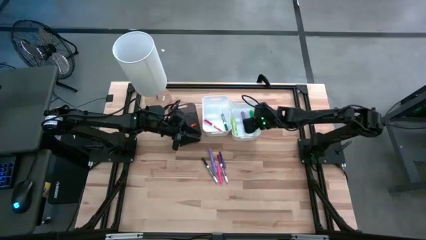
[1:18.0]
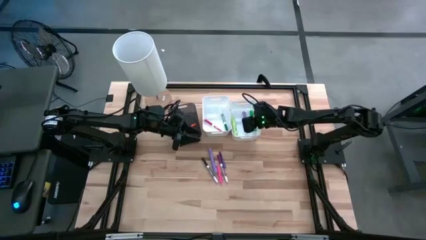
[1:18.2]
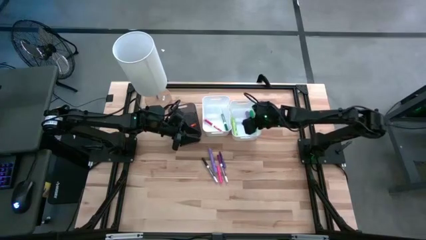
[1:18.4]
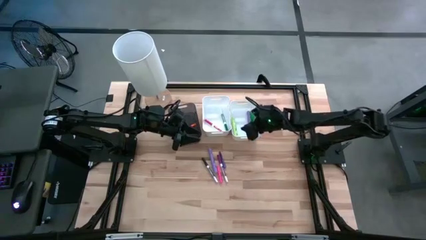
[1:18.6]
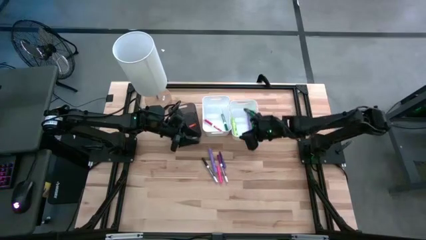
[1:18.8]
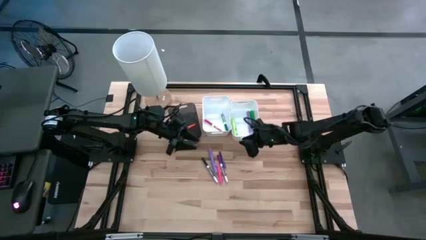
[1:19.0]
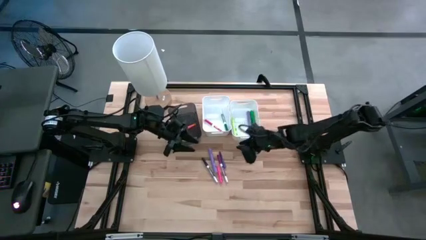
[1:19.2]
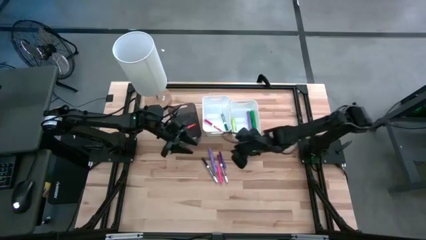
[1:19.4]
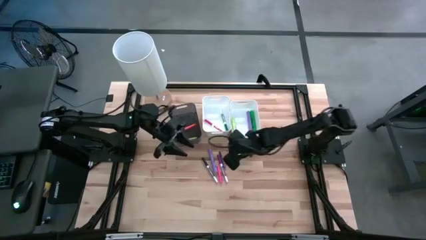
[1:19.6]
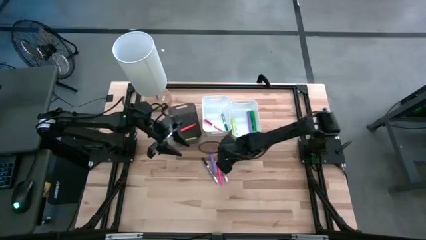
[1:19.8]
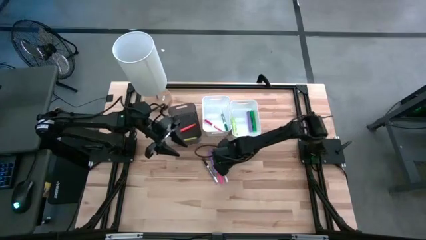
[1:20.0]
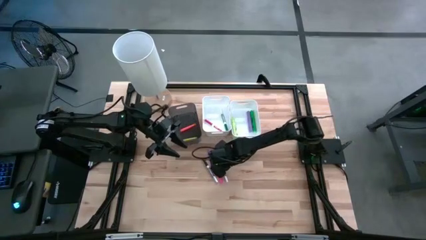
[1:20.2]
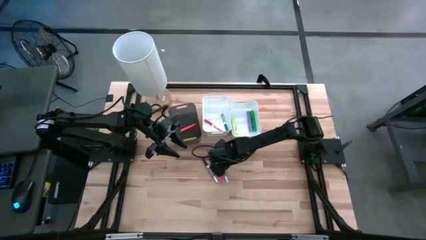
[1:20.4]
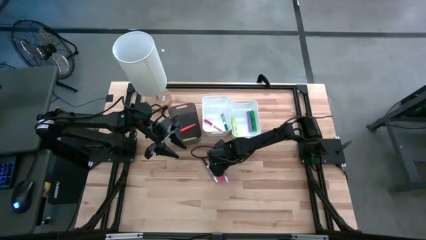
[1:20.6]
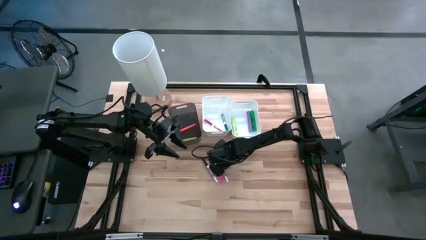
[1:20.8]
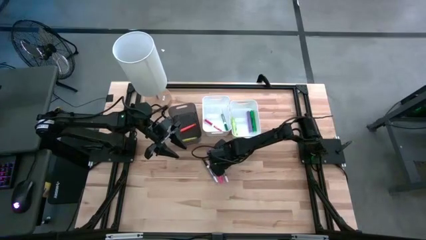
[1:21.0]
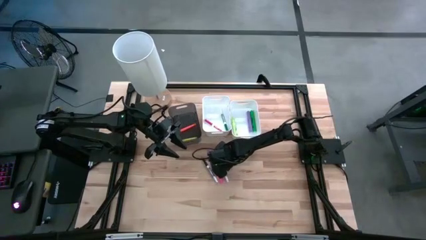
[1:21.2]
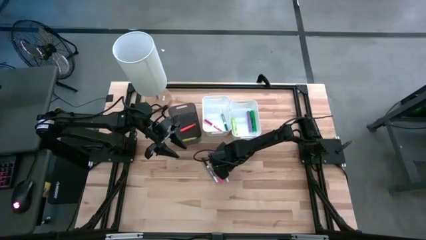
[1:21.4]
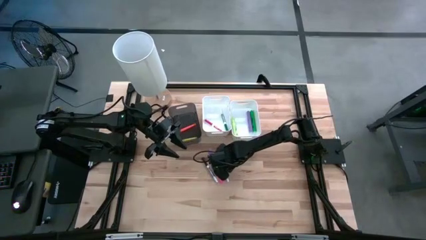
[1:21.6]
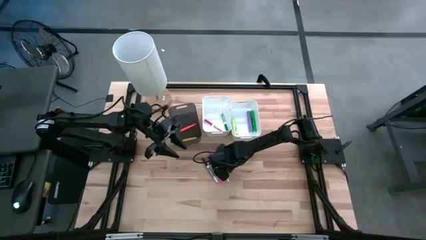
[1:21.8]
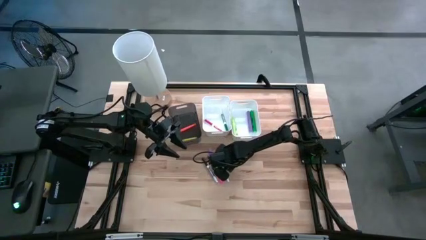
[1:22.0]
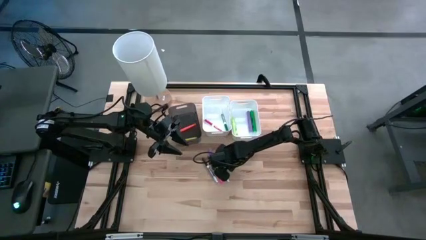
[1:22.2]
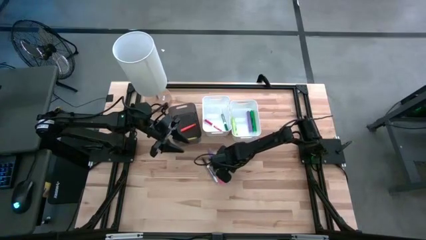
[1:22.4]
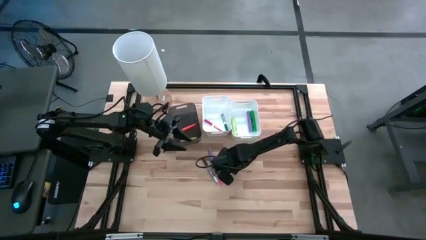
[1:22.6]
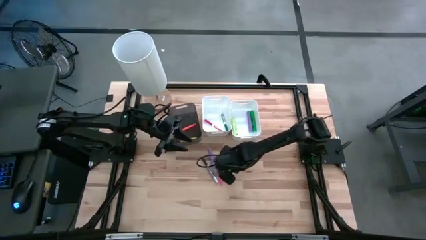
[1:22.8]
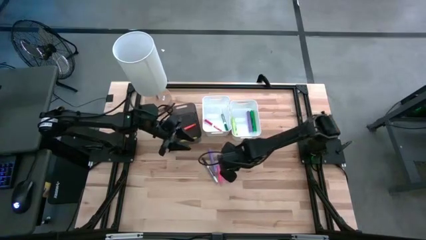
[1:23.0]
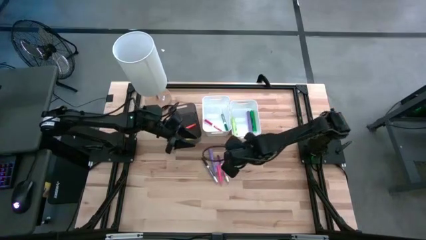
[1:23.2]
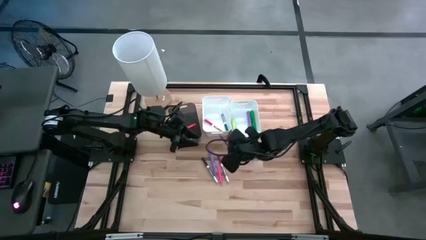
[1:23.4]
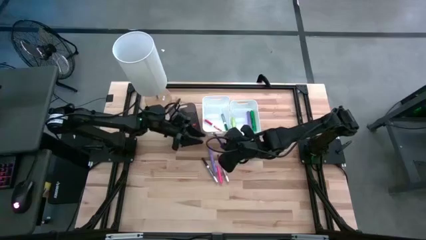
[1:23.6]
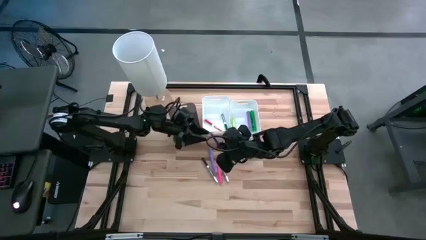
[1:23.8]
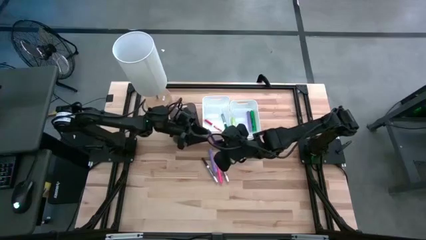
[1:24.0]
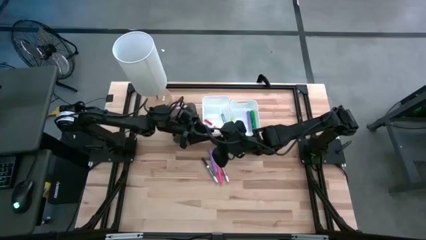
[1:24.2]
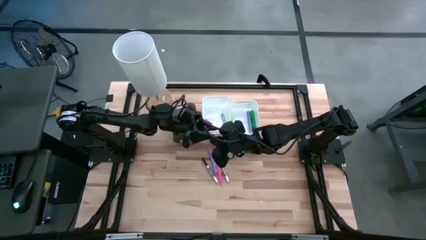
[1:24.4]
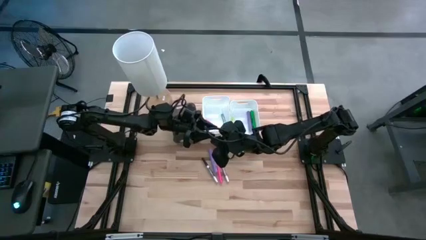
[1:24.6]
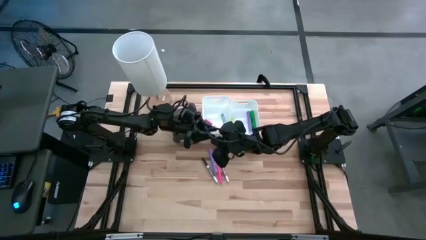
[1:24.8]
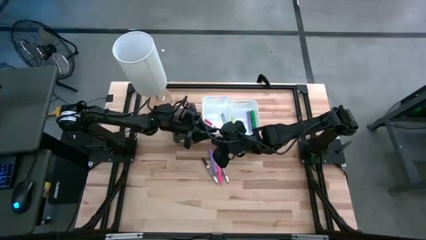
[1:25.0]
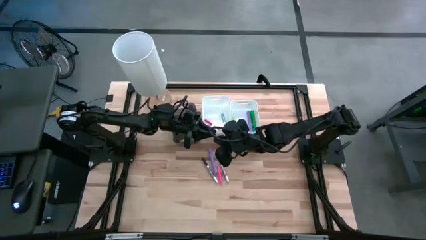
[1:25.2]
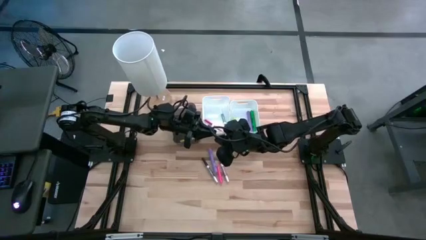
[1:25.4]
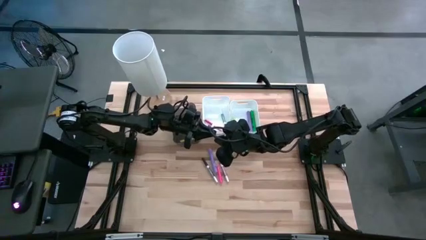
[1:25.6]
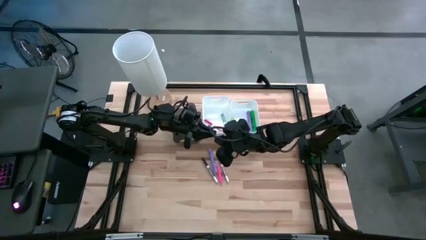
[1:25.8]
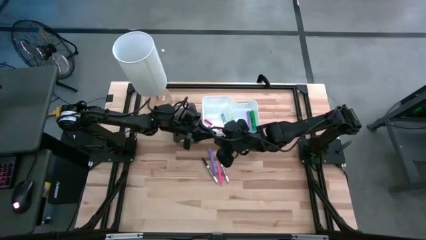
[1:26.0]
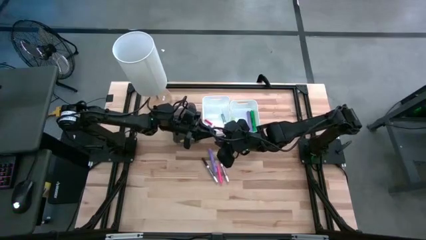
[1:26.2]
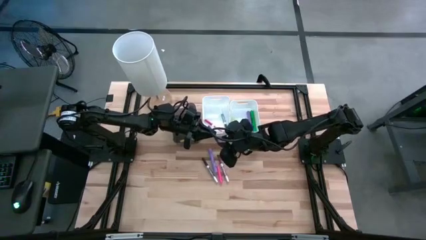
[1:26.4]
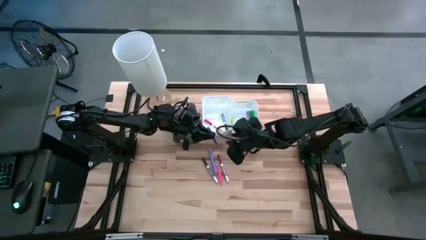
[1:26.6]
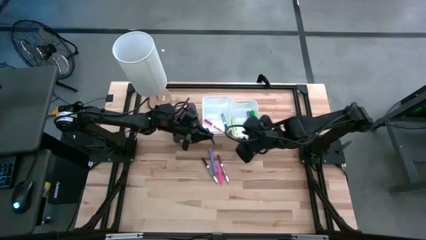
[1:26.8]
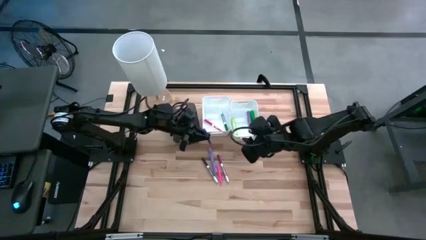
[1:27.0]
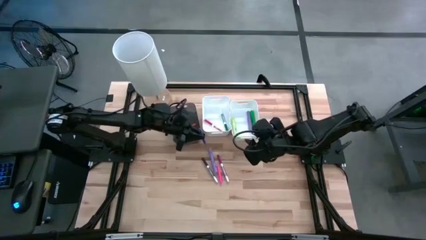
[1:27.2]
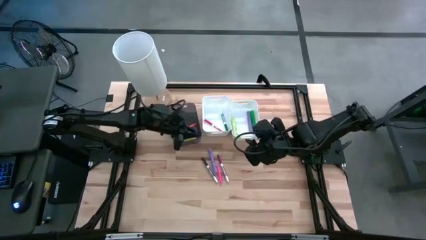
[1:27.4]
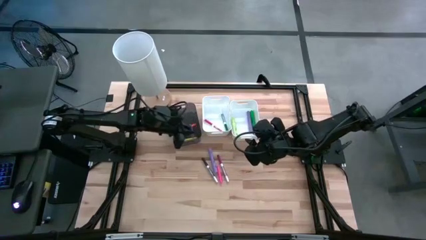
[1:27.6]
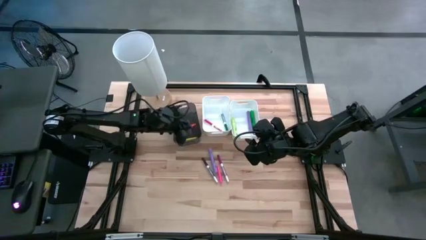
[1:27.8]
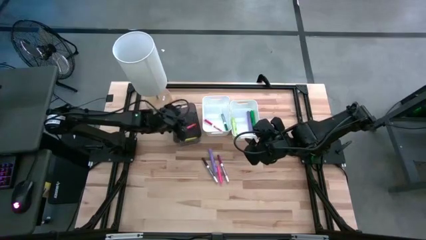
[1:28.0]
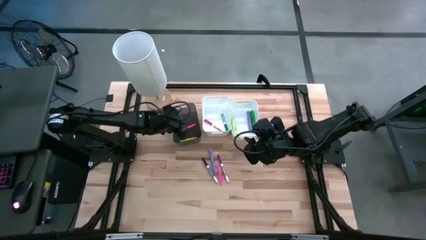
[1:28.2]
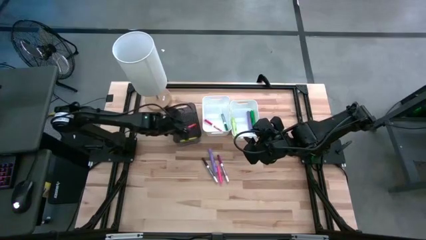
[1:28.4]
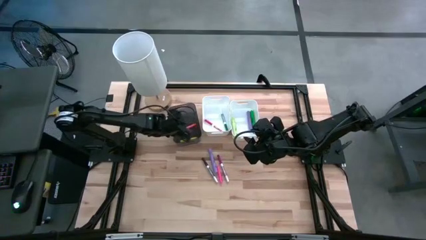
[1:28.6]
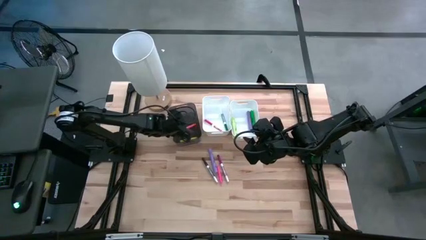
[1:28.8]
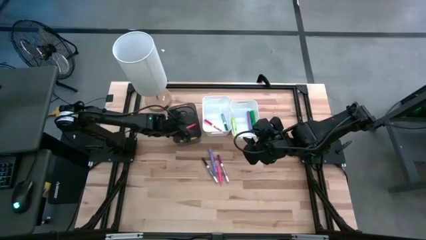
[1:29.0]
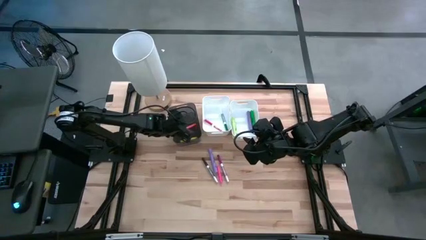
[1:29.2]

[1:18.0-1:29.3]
Task: Pick & Place Markers
Put the purple pen into the black bin
